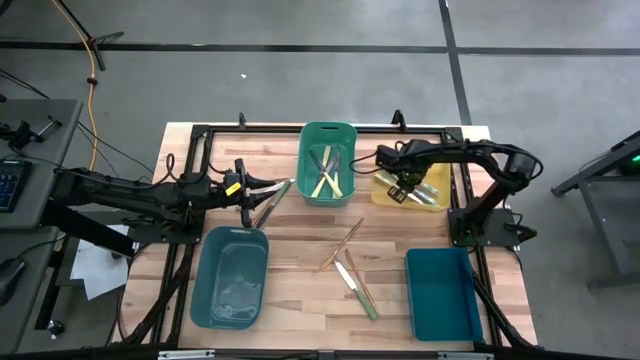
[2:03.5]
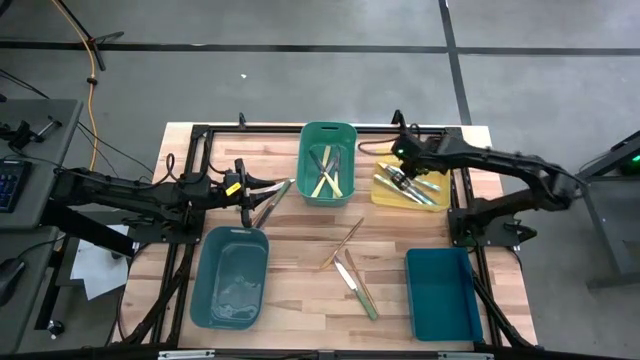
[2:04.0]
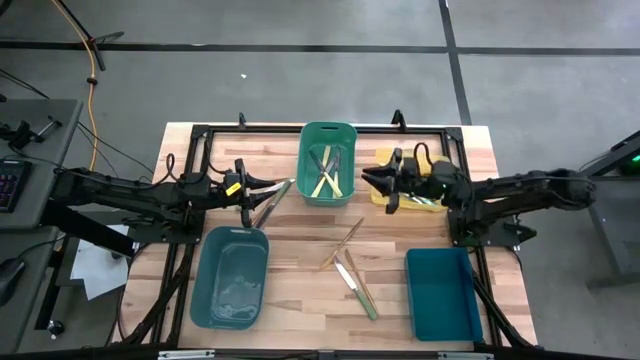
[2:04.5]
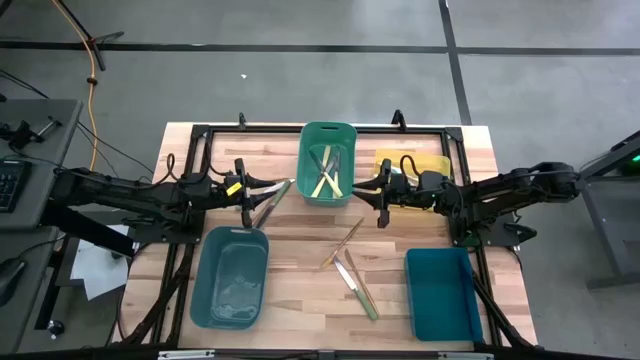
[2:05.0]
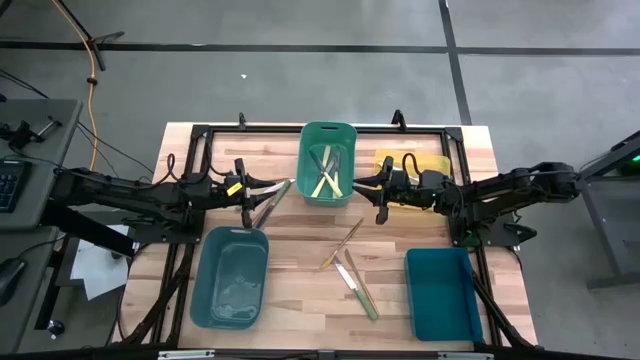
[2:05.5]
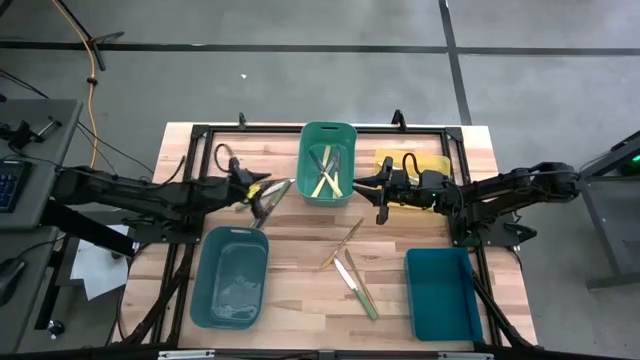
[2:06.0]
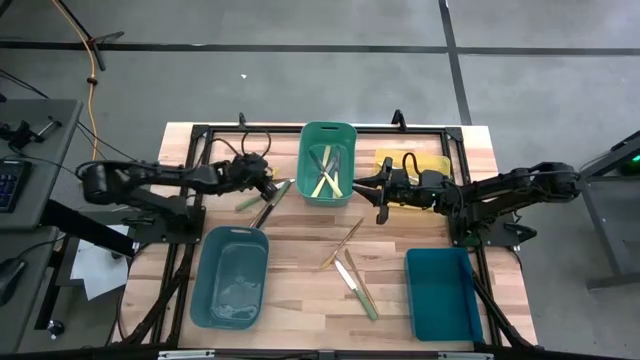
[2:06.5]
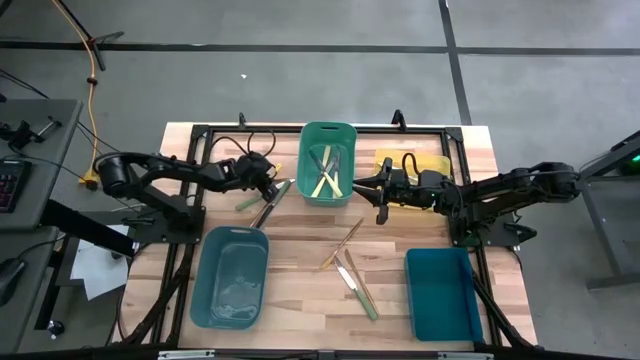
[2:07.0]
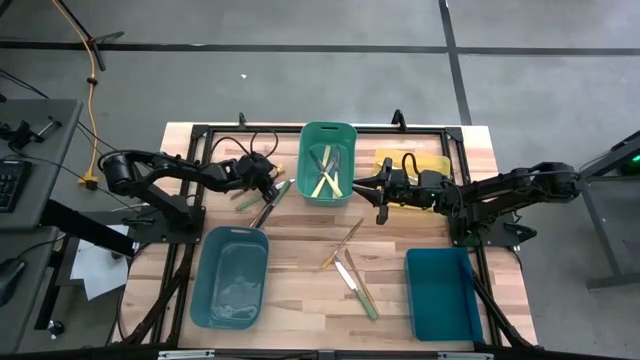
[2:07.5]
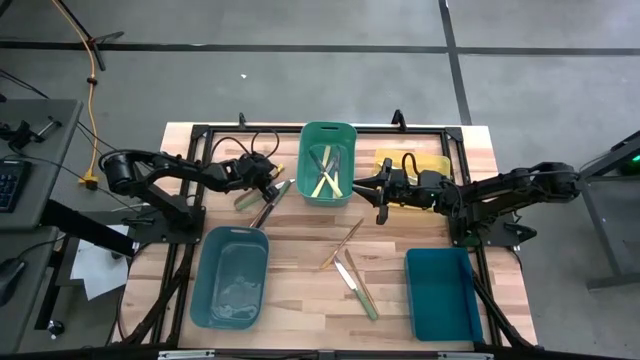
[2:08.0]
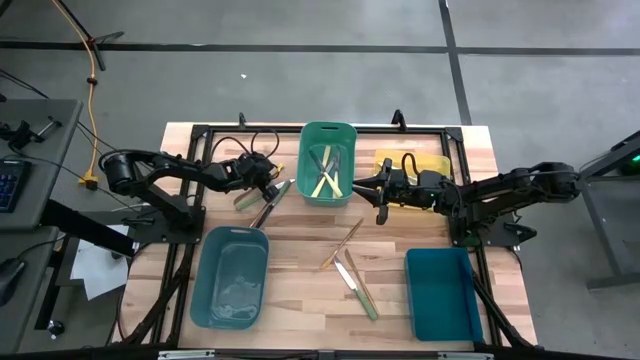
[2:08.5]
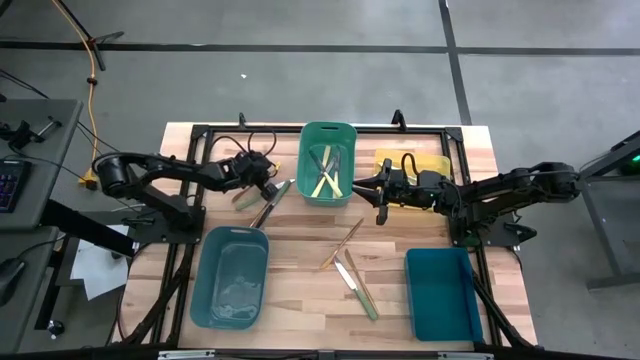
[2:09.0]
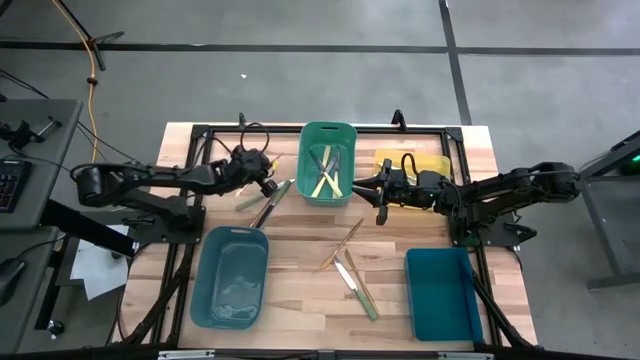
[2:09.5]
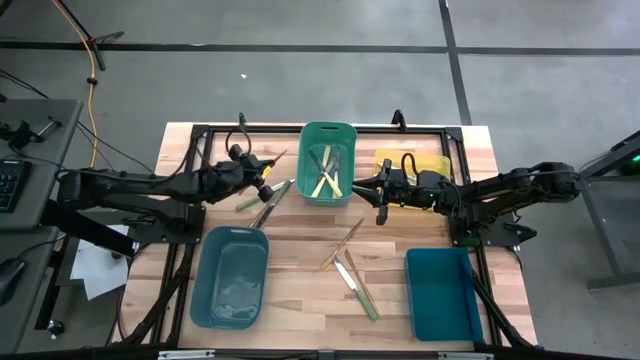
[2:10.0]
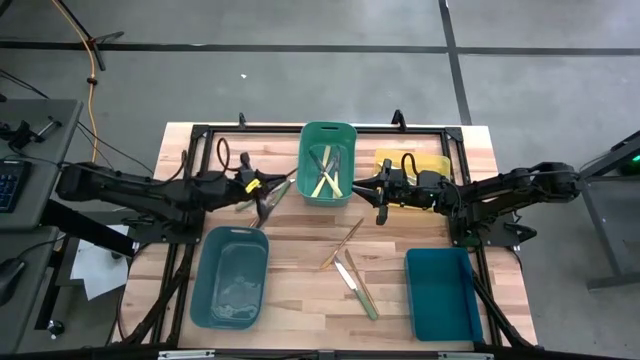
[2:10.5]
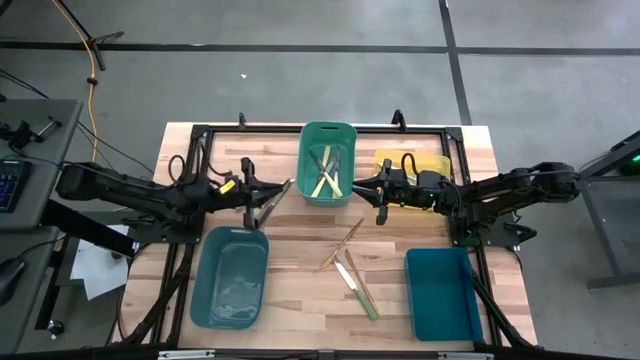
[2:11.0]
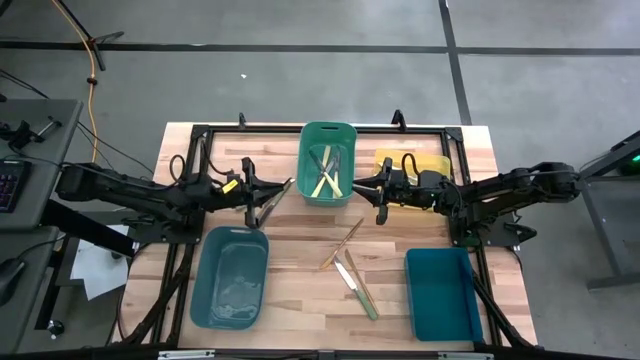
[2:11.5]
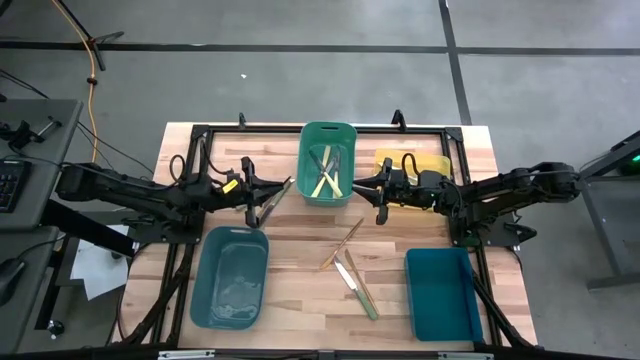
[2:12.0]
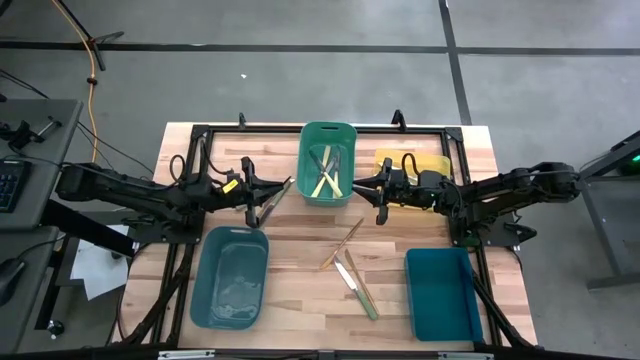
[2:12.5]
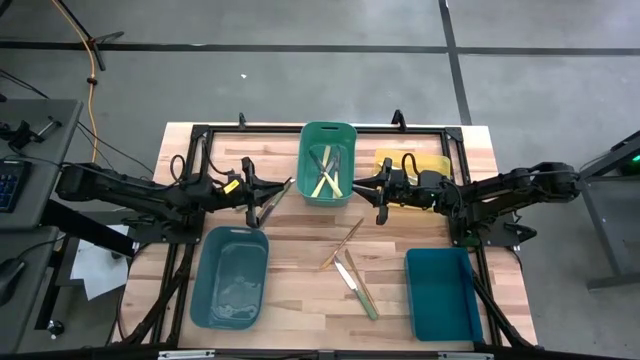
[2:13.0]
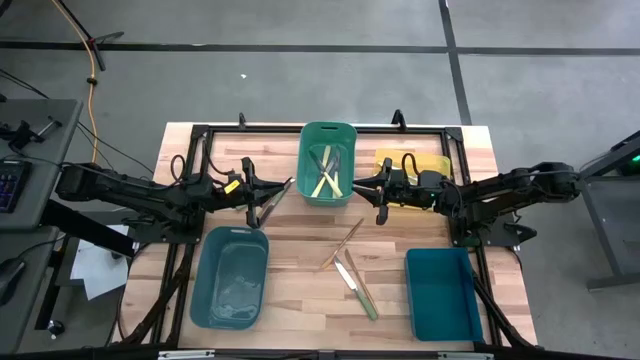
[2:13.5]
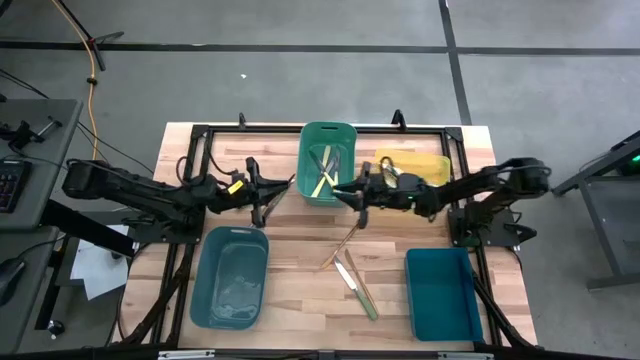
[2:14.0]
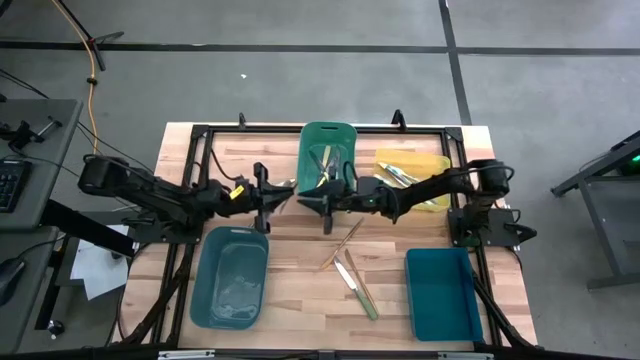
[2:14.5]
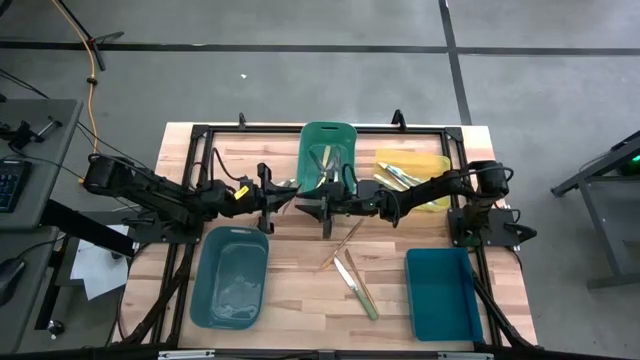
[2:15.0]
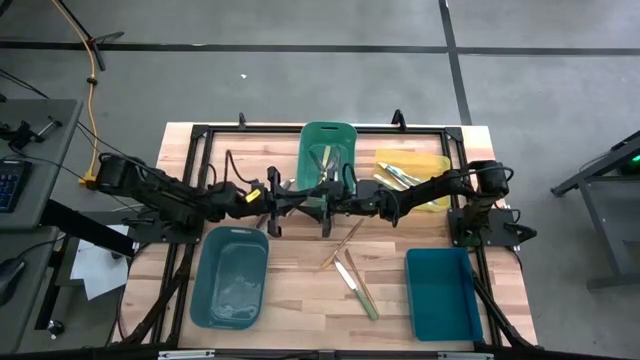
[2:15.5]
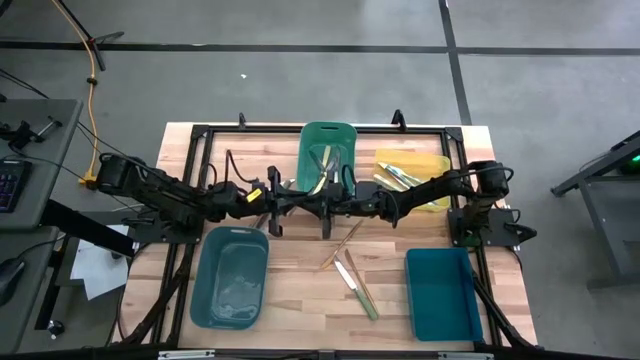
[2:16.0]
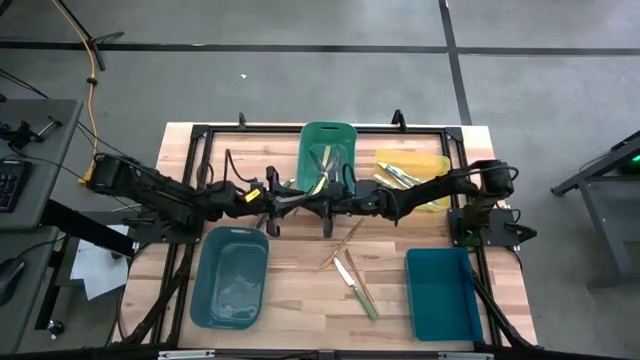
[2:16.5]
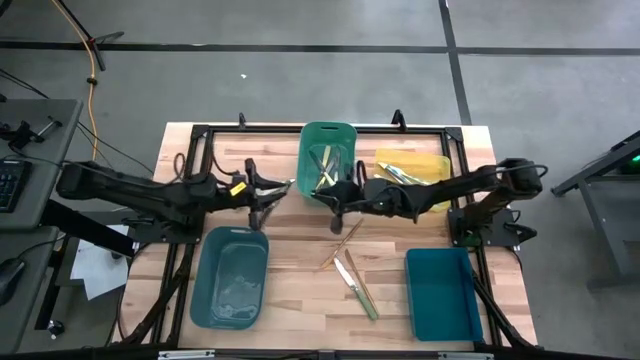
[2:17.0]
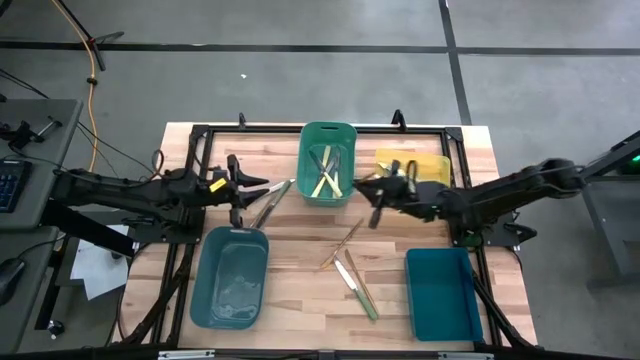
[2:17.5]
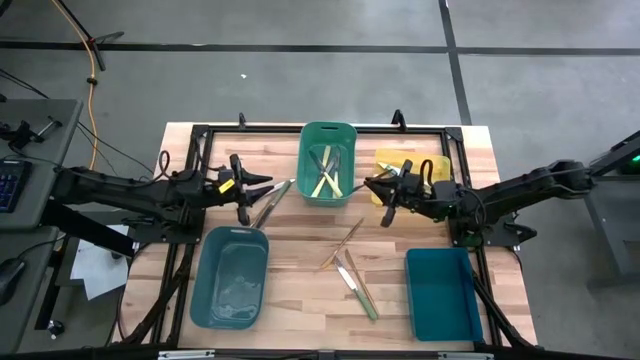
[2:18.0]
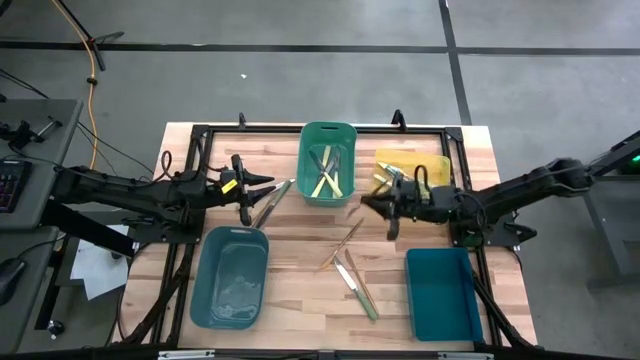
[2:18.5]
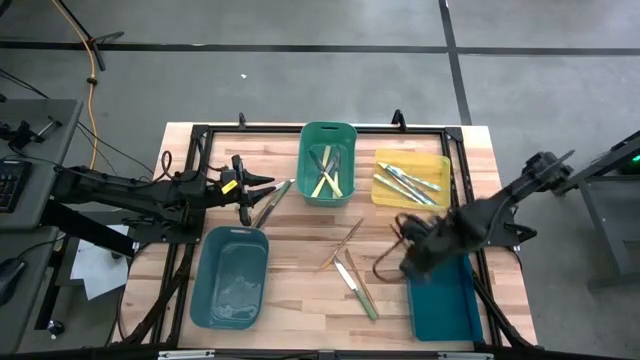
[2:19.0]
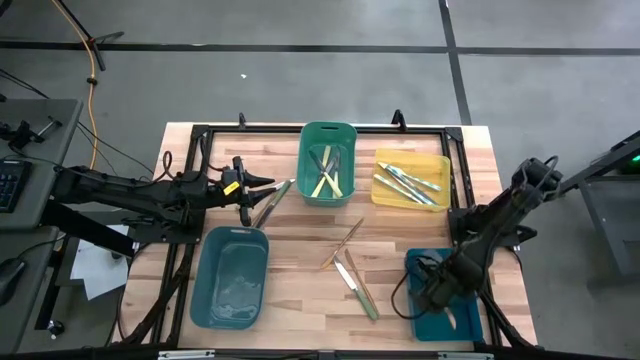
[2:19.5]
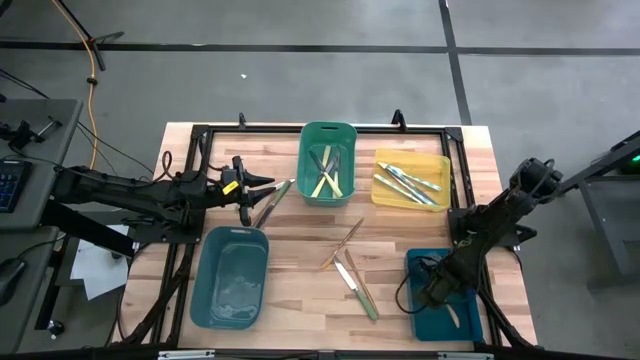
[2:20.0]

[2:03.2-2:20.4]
Task: Sort silverware by color (type)
Put the gold knife into the right blue bin

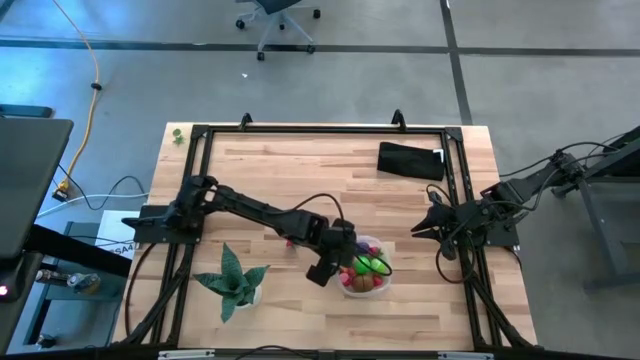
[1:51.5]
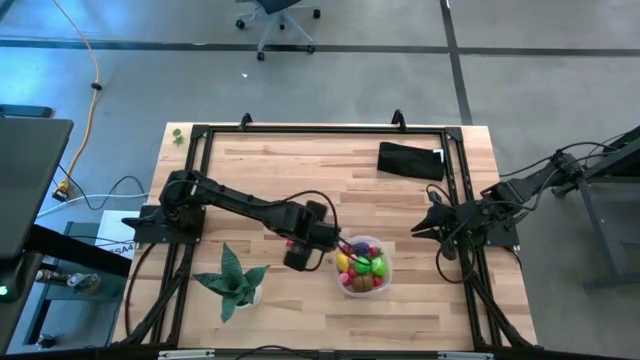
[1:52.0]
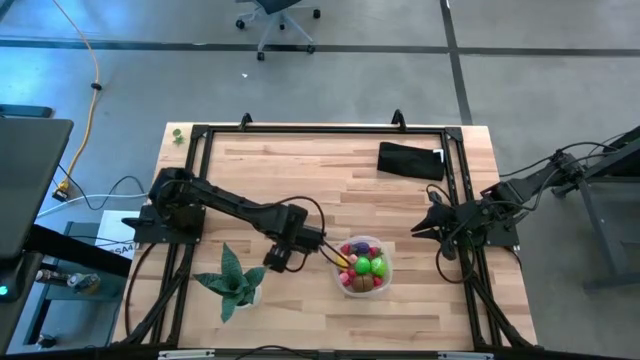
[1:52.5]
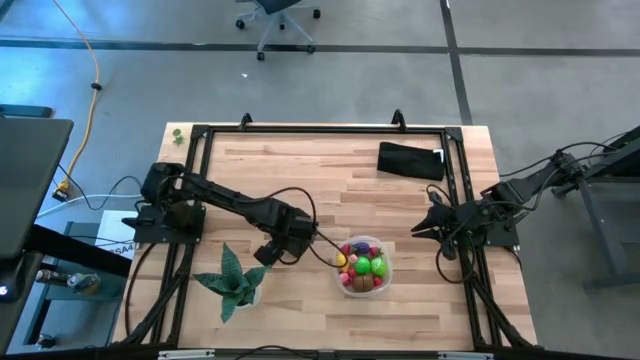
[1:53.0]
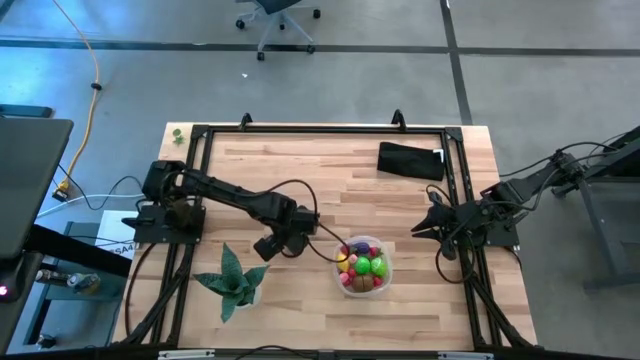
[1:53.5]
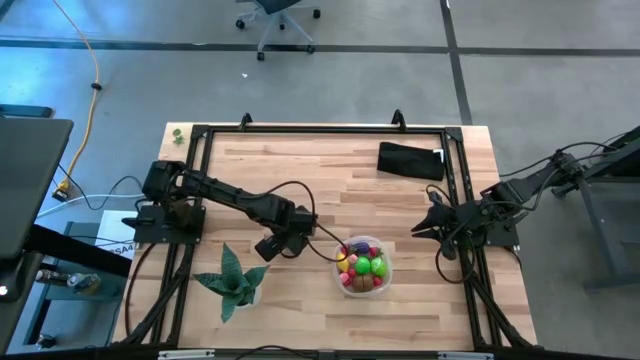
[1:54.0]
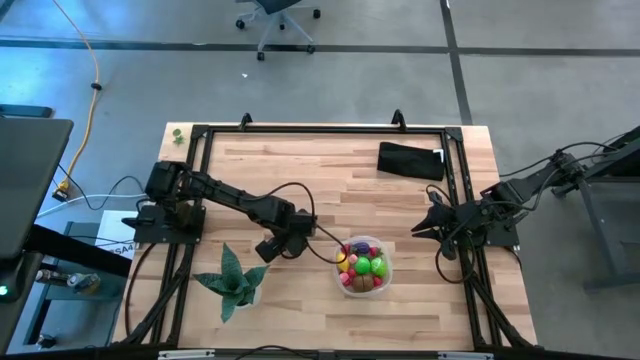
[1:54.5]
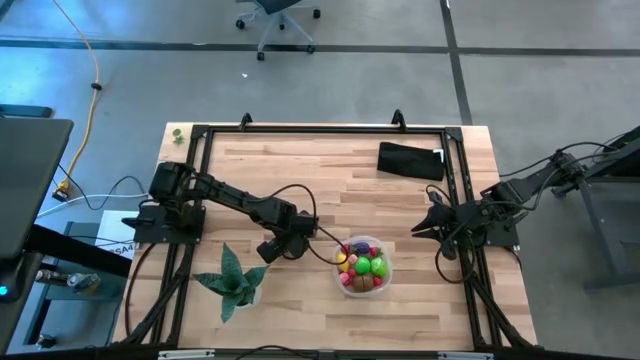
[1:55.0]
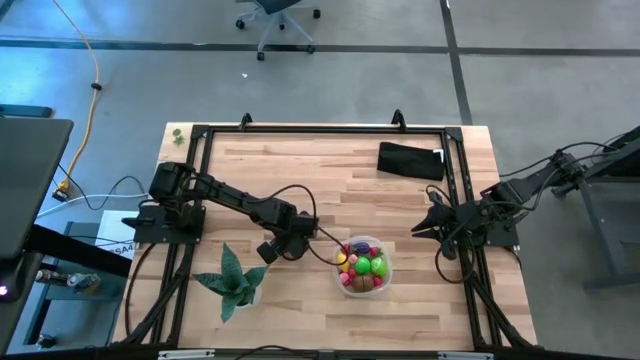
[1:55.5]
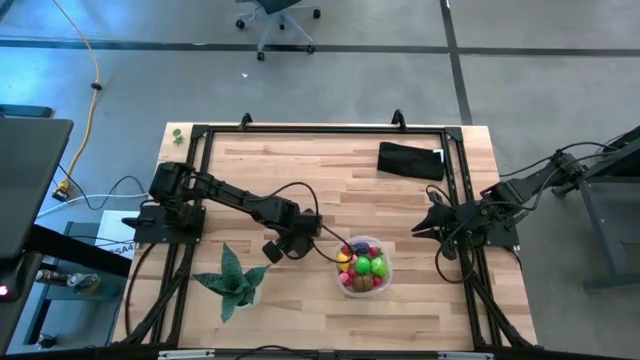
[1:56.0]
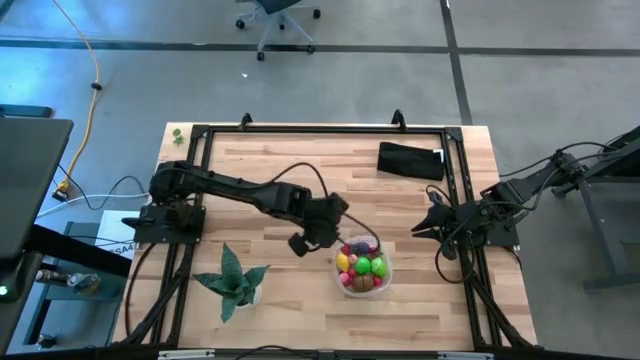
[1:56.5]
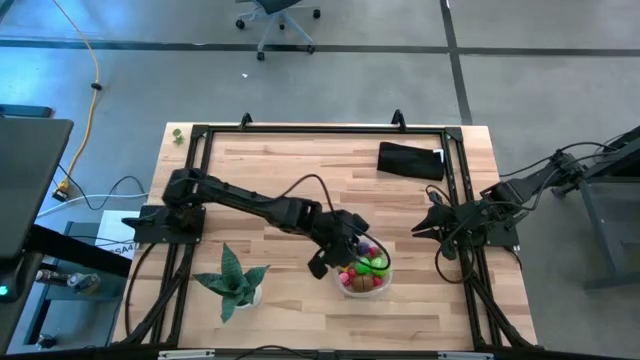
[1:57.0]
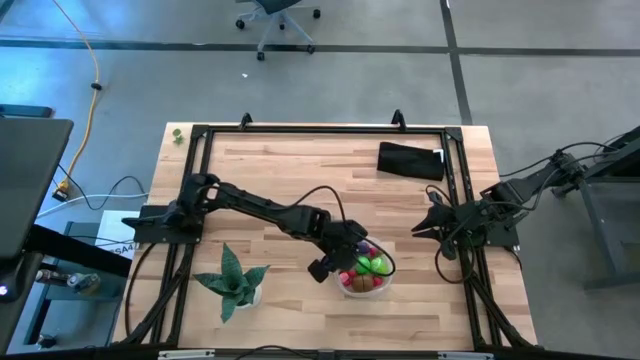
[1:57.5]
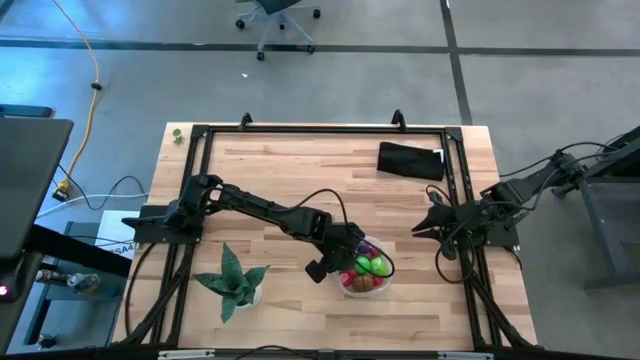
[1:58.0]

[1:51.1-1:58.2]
Task: Pick and placing Produce into tupperware
Put the strawberry into the transparent bin
